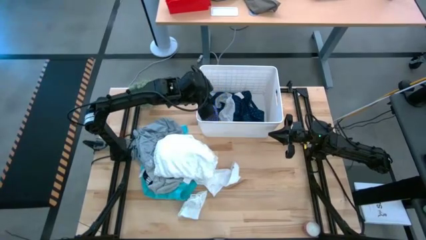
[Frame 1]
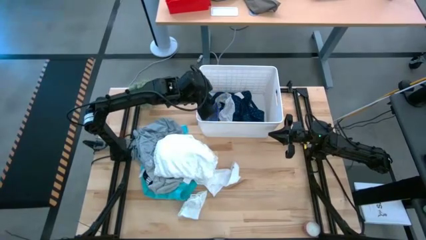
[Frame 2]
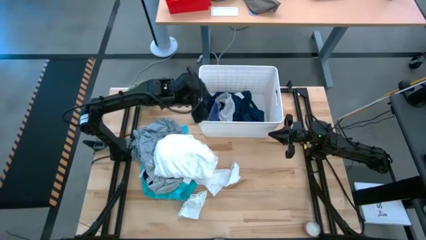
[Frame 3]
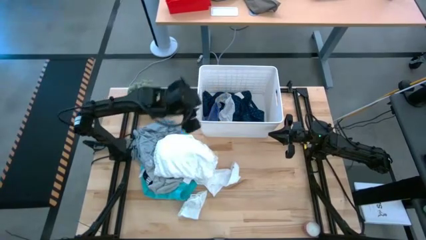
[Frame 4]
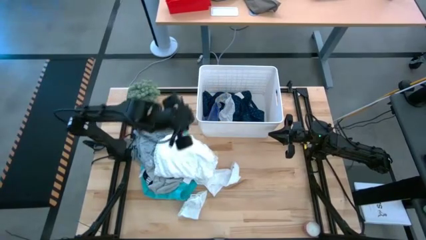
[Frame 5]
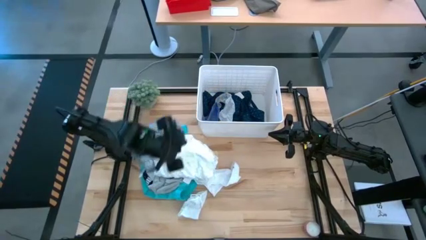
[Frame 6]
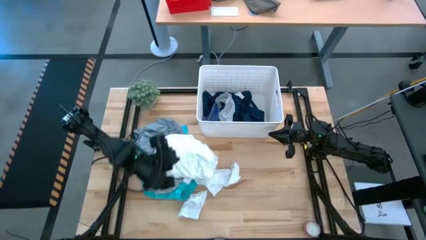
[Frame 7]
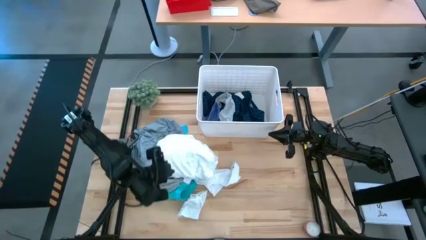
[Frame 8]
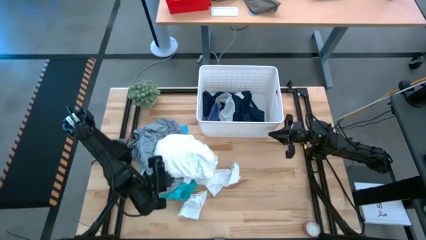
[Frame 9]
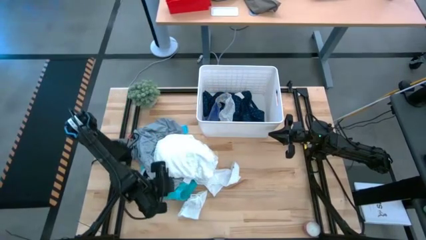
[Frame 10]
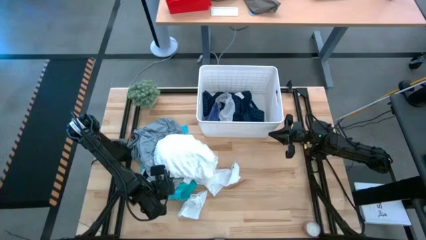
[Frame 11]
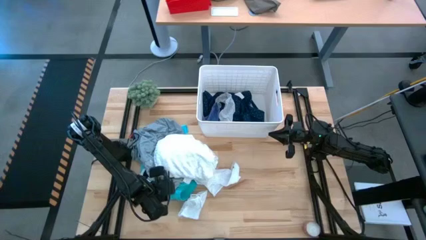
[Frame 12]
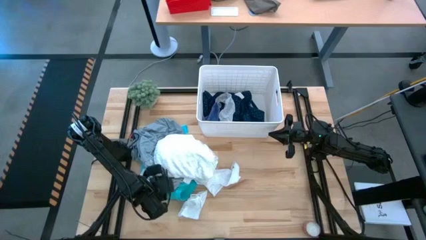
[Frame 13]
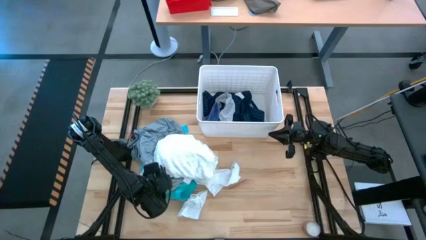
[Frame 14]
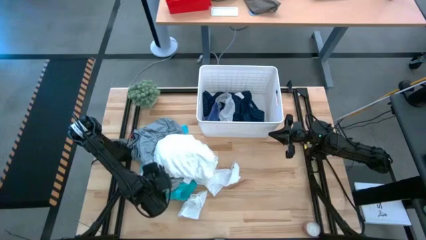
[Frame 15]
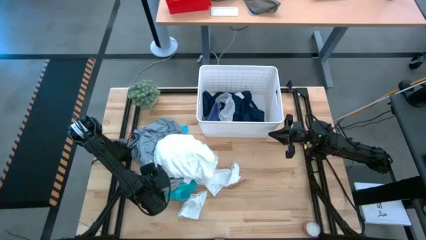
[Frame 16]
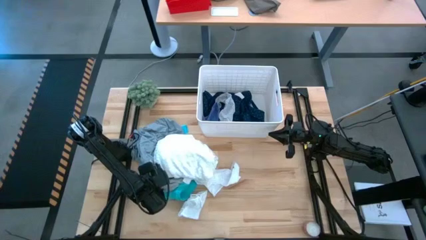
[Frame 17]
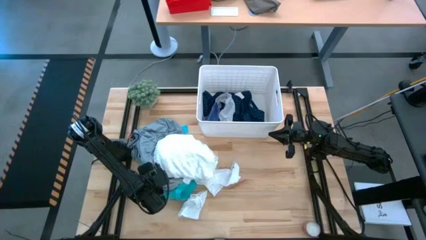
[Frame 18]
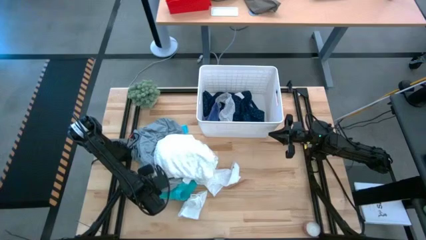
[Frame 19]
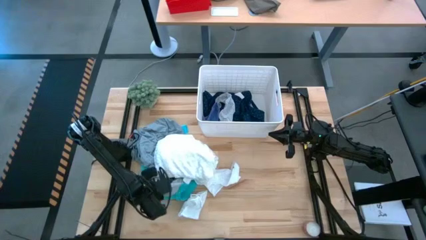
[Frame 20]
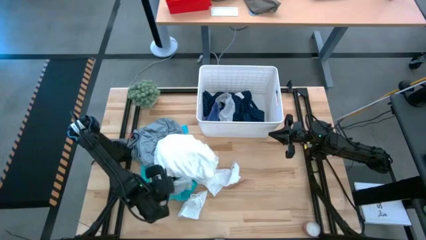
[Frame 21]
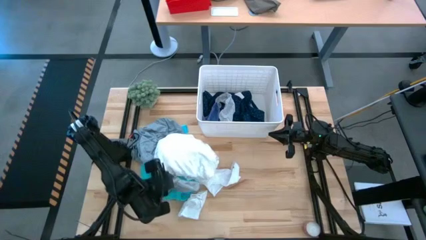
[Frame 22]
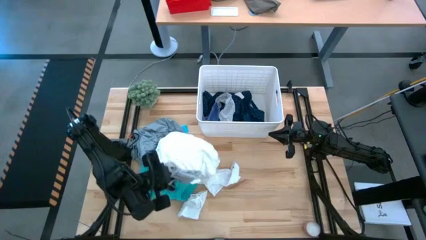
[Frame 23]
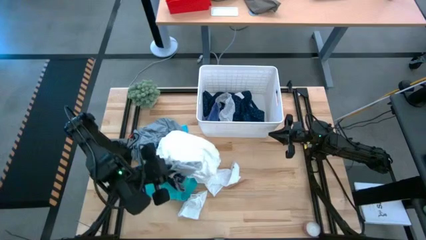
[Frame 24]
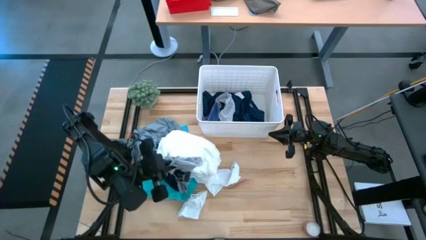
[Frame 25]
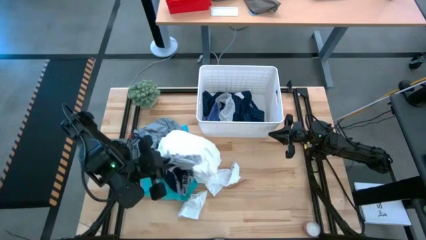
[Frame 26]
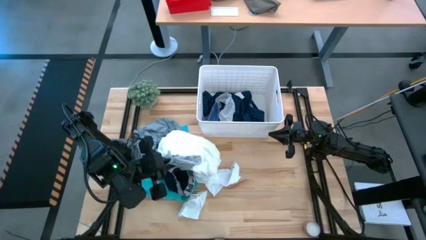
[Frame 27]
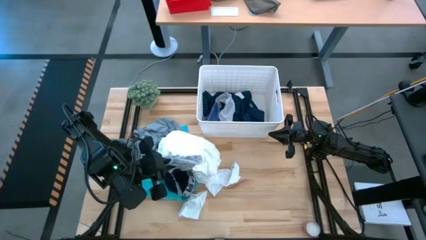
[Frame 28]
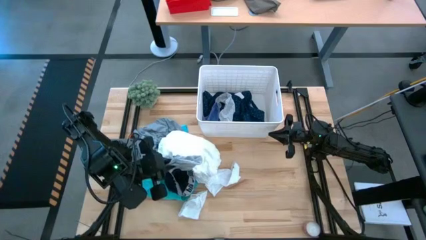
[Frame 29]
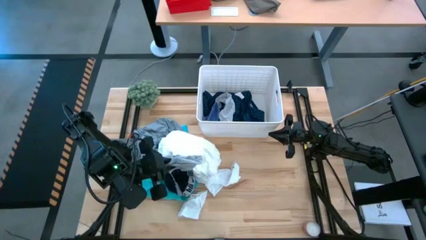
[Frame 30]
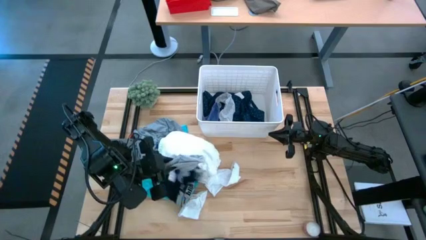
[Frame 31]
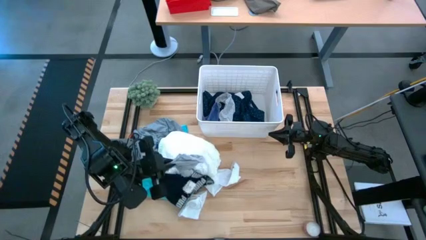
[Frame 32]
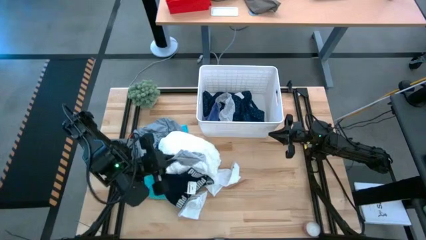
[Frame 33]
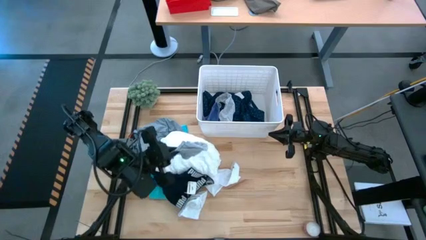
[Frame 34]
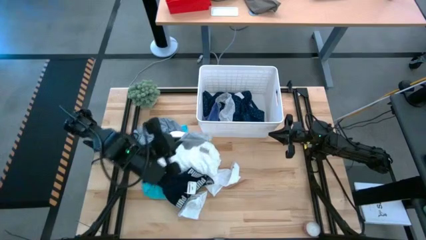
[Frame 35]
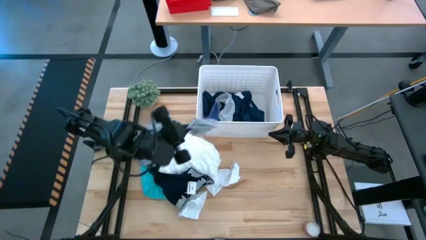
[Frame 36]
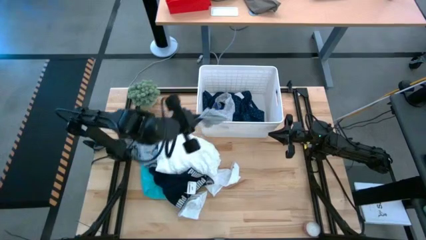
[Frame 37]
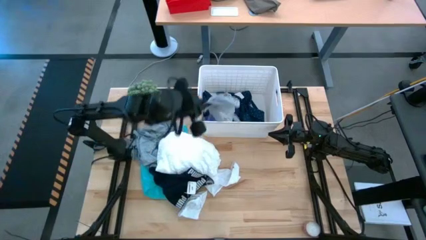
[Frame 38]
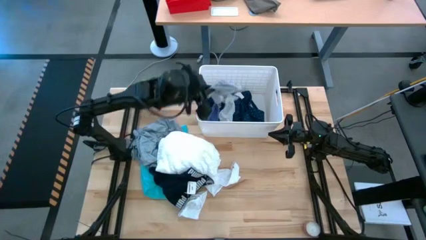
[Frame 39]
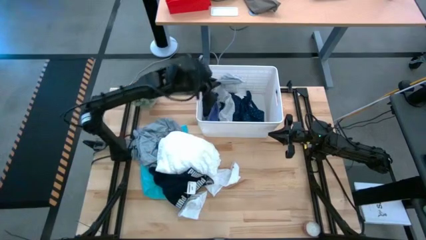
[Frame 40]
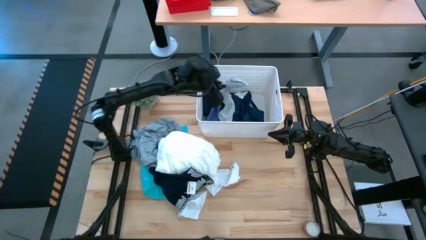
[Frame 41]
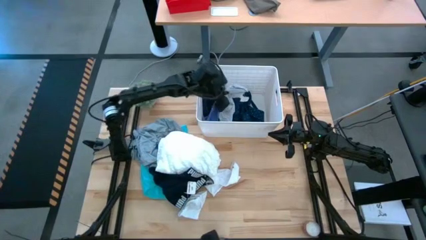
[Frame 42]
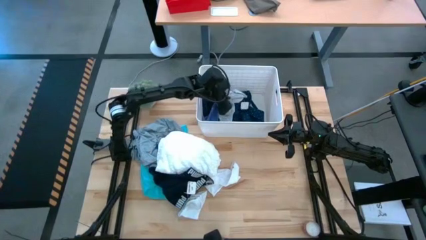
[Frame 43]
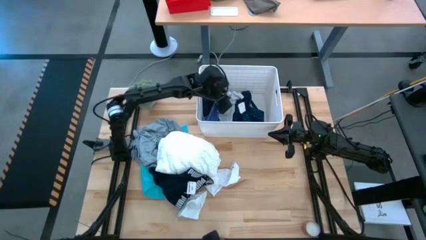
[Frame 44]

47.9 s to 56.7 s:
Task: Sort clothes
Put the gray socks into the white bin

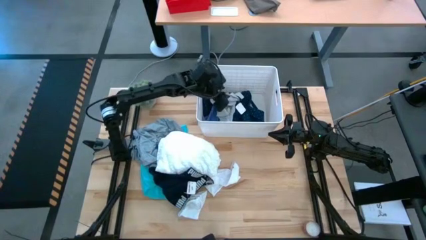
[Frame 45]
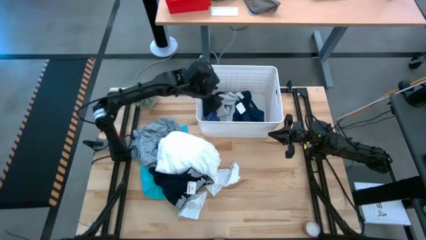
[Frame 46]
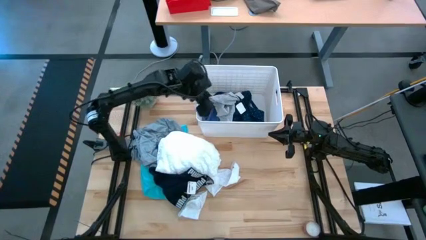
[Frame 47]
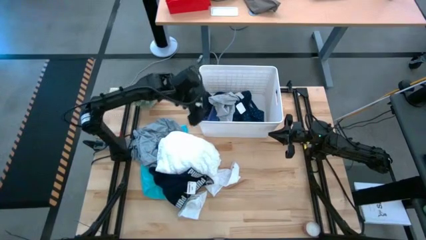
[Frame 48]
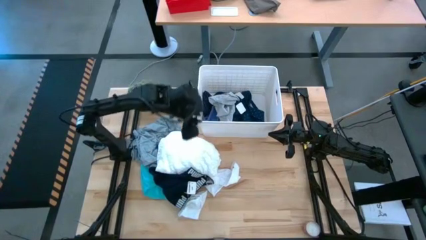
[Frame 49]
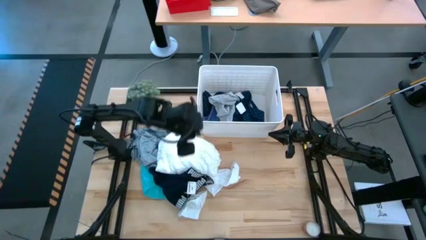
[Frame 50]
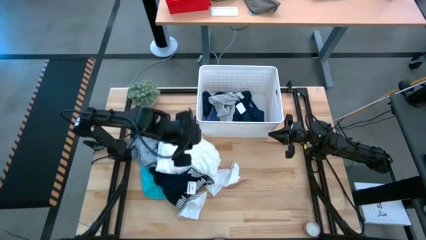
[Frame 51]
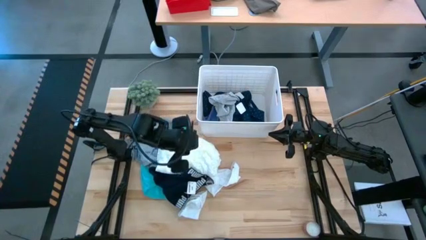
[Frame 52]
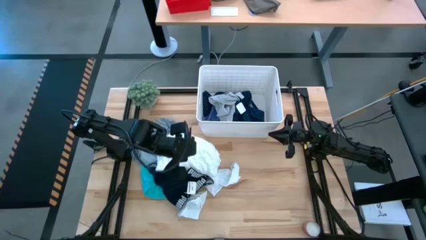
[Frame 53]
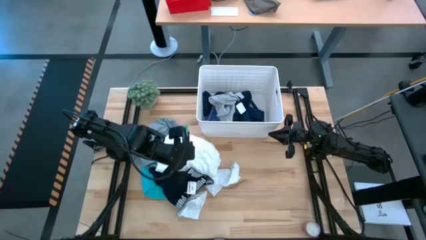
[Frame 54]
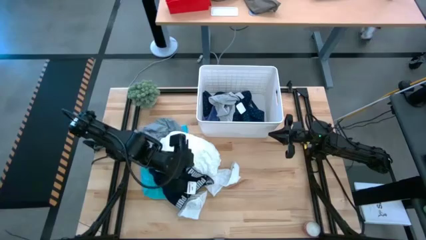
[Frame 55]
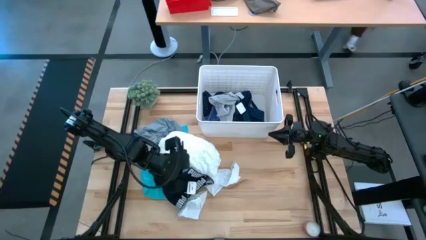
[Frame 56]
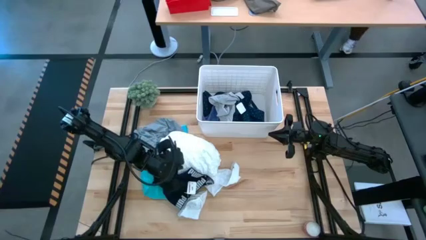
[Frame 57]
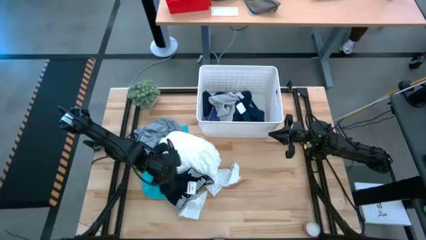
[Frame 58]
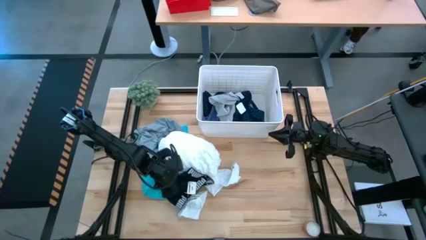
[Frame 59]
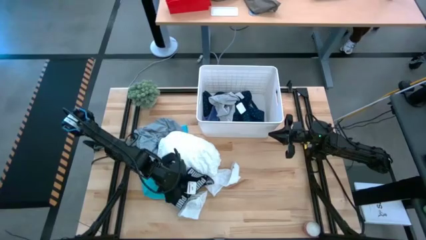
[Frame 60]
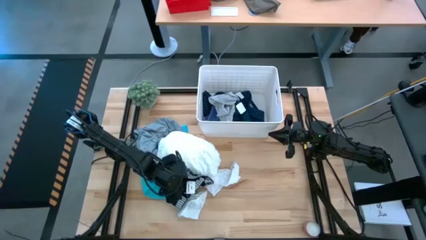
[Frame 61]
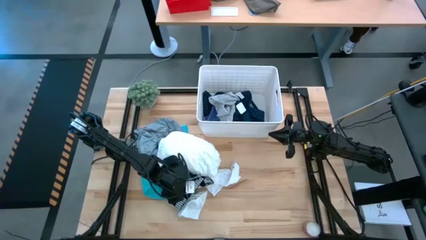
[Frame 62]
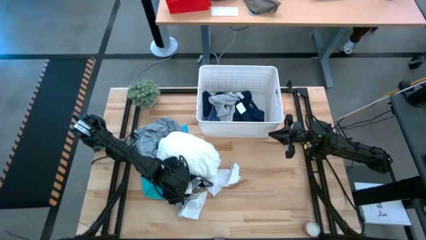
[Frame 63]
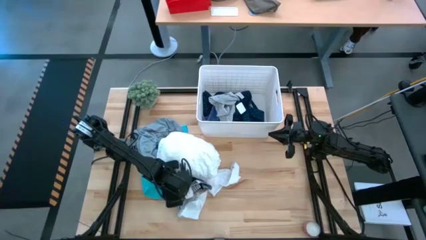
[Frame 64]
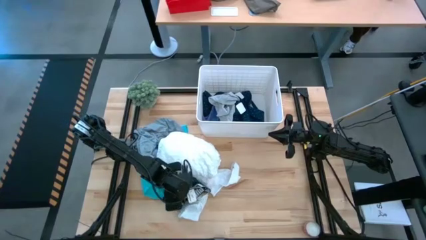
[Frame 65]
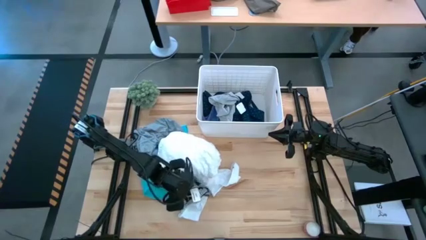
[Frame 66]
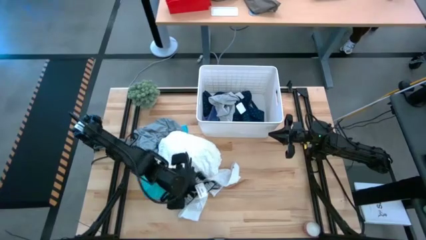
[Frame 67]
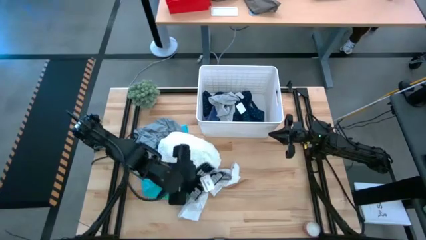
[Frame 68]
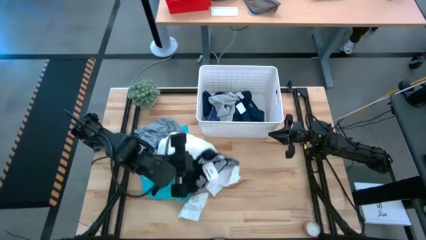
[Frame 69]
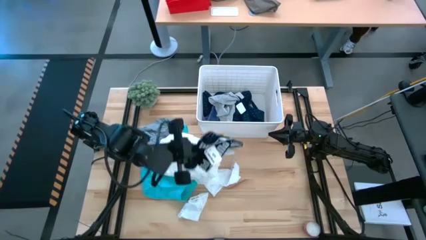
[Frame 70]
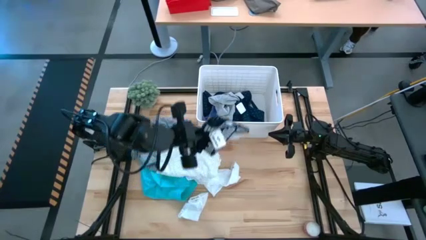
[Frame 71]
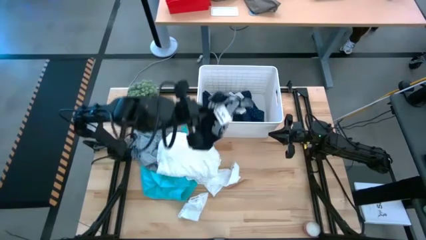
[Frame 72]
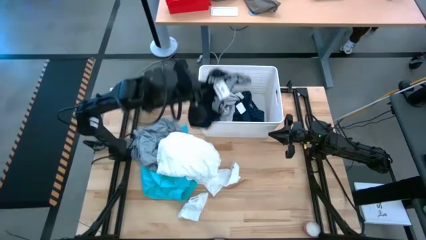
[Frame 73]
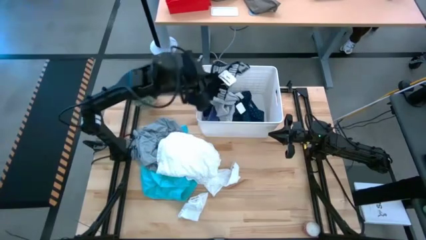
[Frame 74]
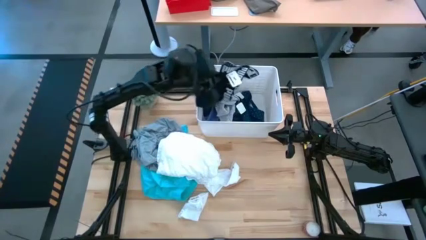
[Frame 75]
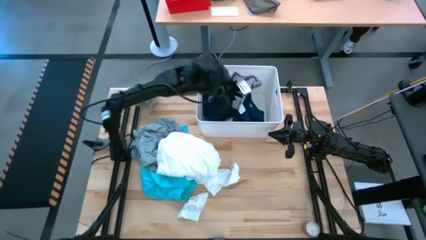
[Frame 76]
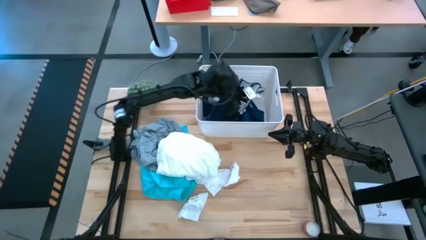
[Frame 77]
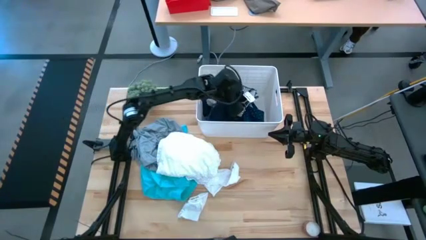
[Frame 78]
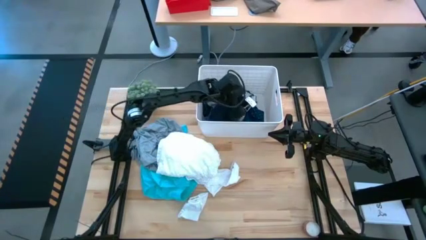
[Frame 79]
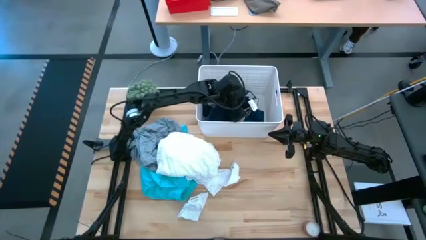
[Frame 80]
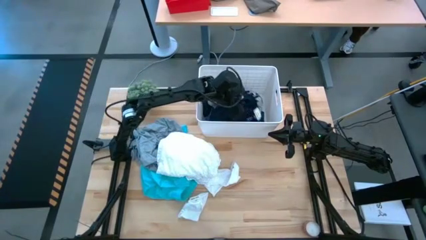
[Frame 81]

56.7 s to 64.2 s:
Put the blue underwear into the white bin
